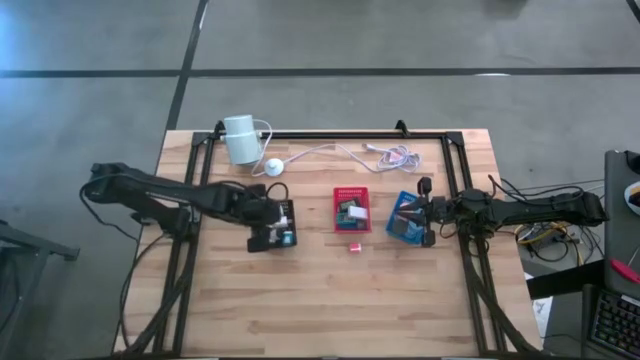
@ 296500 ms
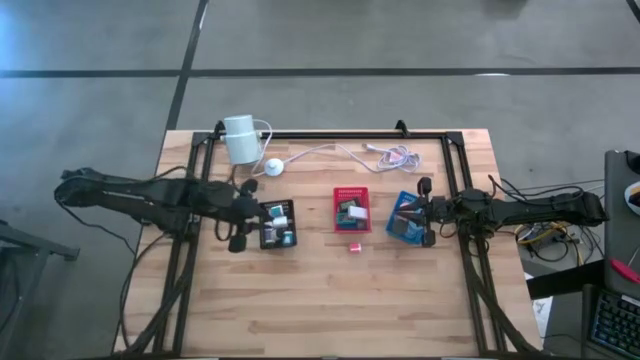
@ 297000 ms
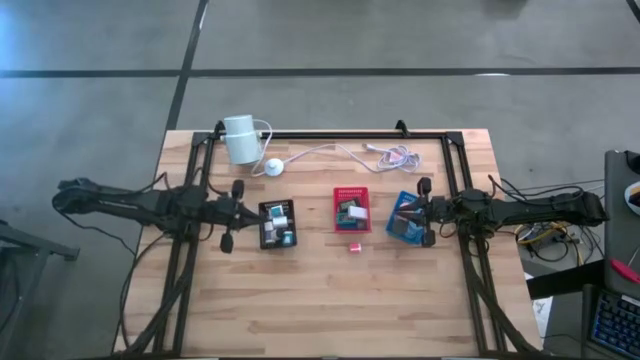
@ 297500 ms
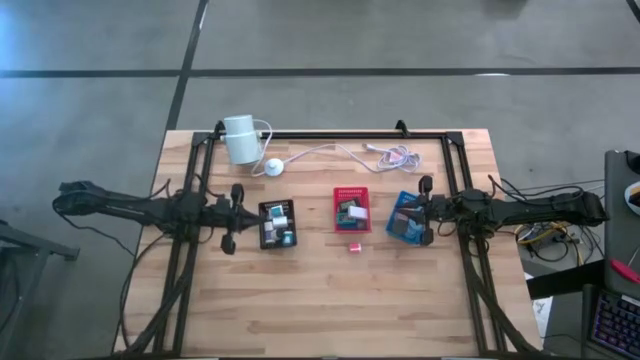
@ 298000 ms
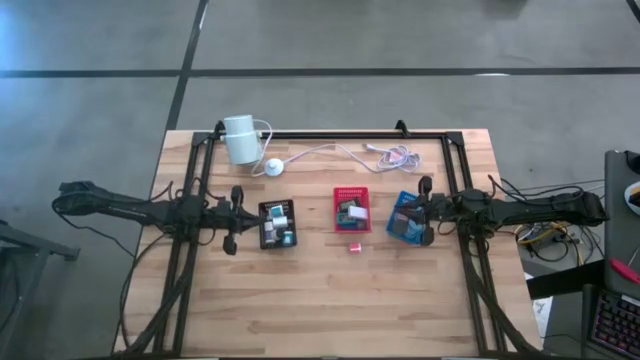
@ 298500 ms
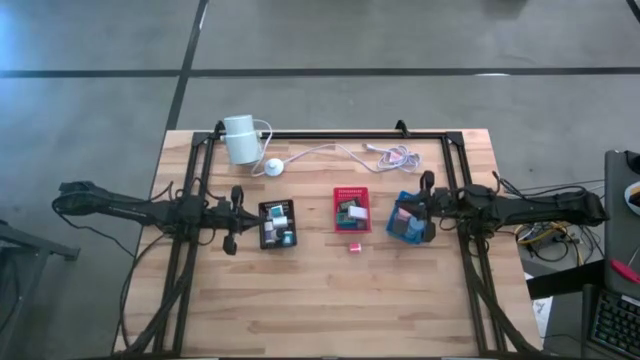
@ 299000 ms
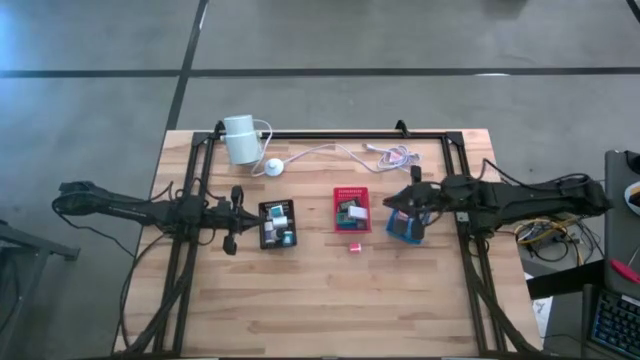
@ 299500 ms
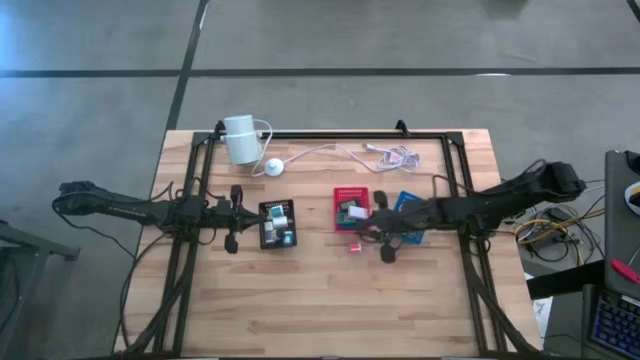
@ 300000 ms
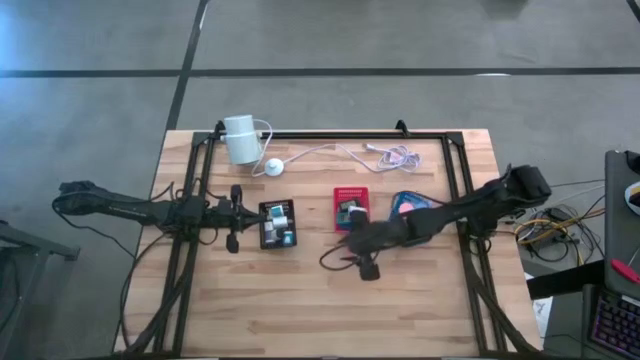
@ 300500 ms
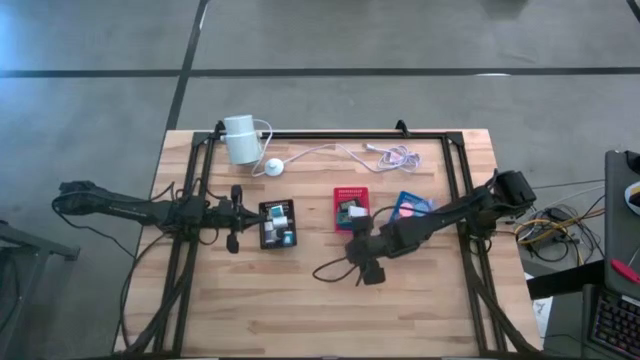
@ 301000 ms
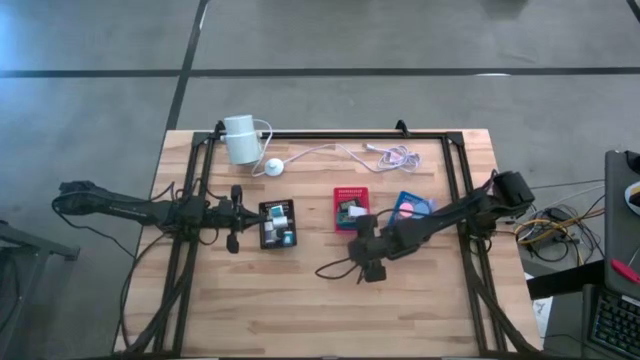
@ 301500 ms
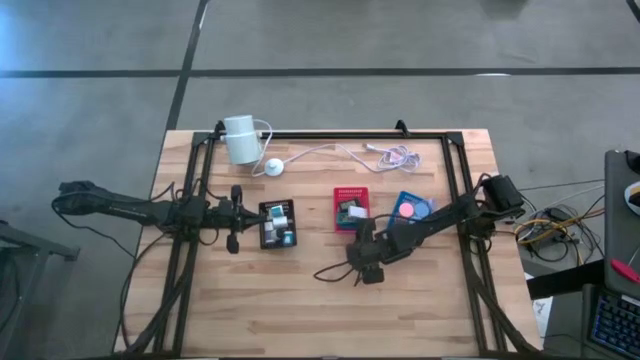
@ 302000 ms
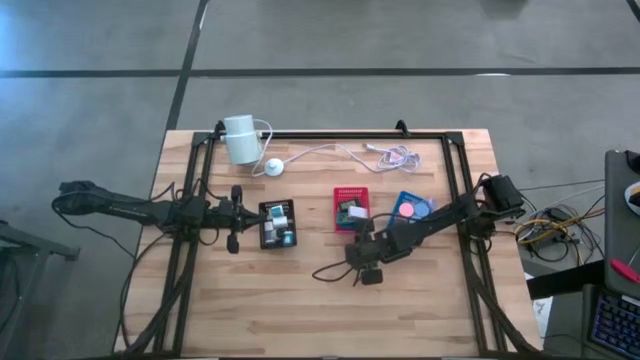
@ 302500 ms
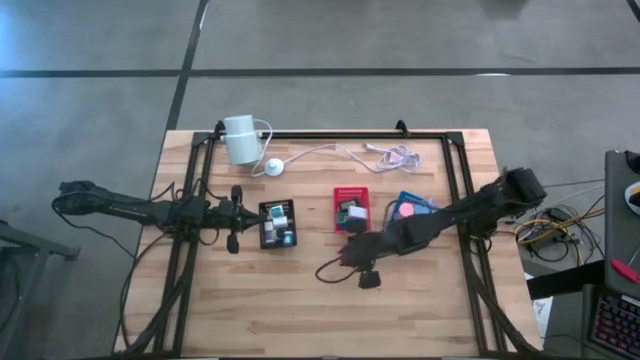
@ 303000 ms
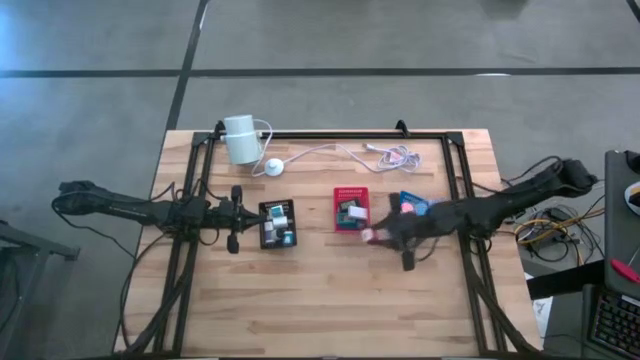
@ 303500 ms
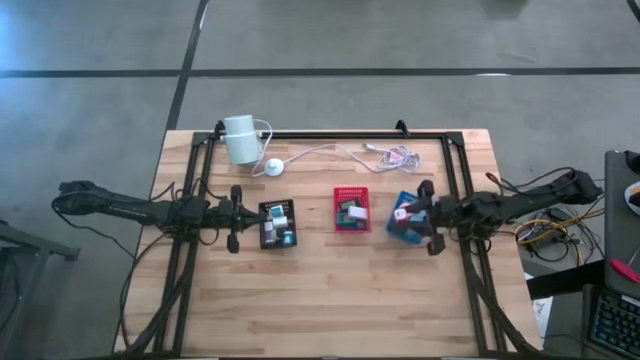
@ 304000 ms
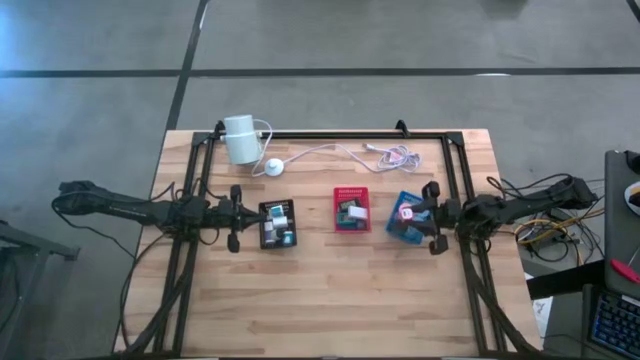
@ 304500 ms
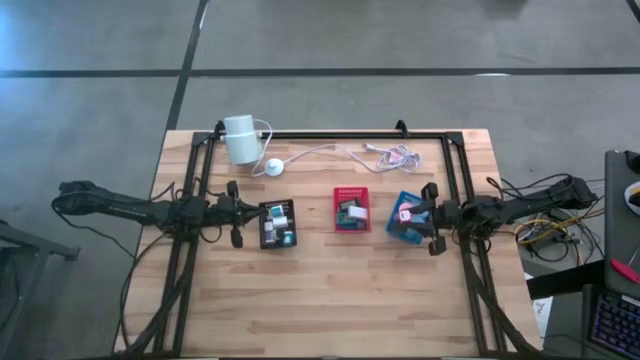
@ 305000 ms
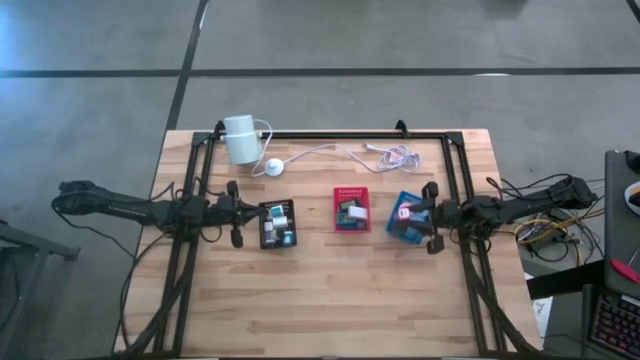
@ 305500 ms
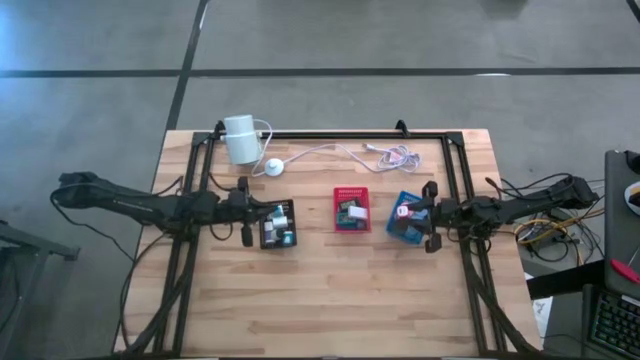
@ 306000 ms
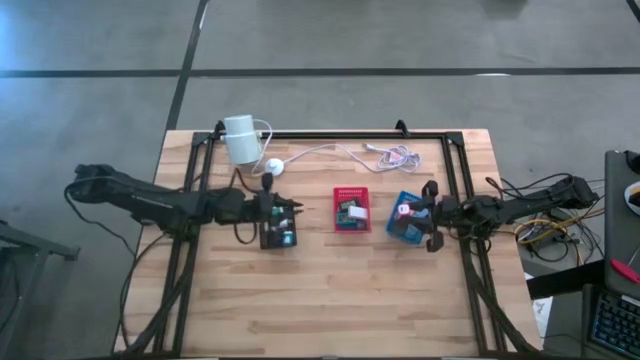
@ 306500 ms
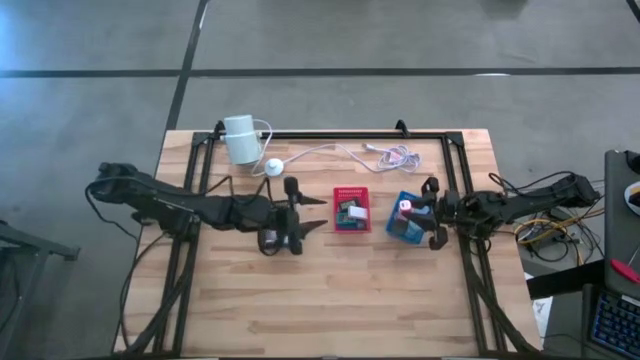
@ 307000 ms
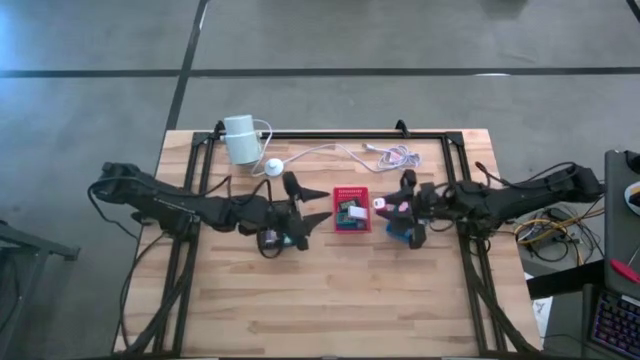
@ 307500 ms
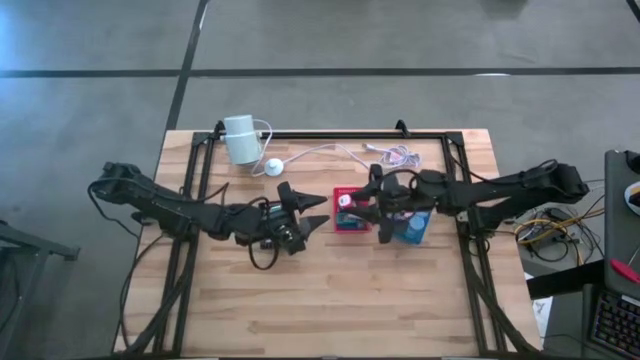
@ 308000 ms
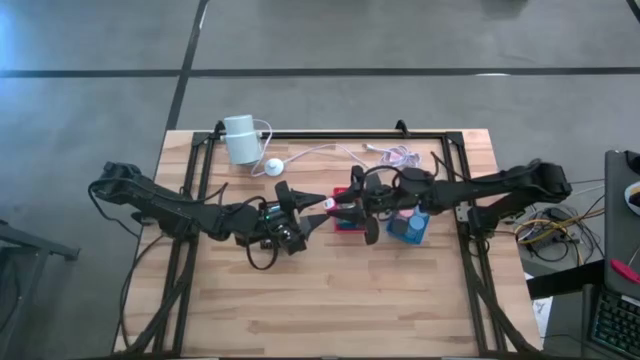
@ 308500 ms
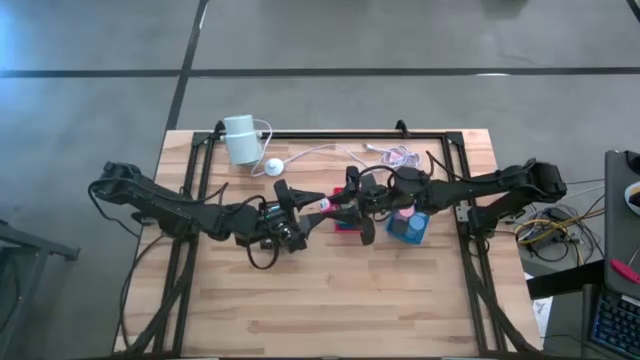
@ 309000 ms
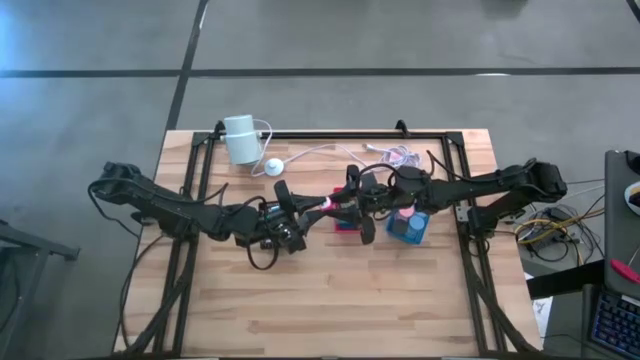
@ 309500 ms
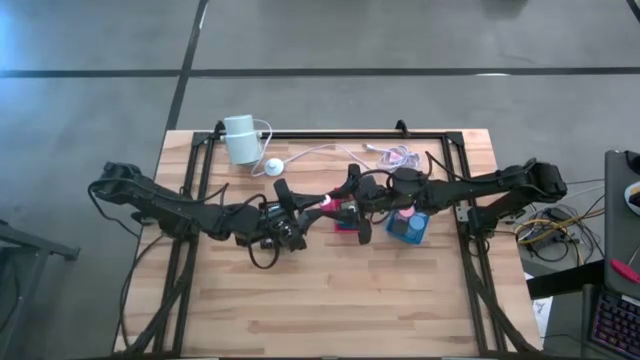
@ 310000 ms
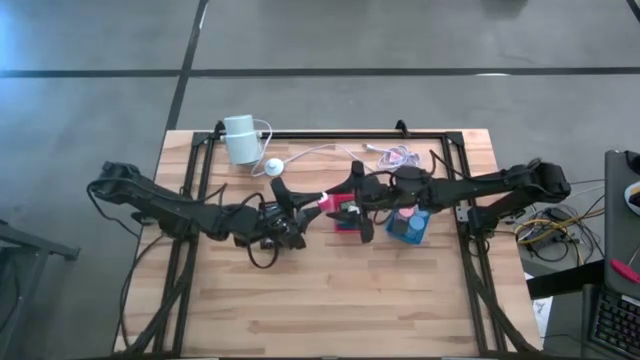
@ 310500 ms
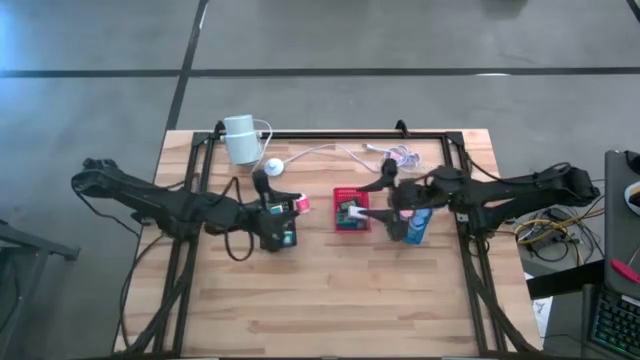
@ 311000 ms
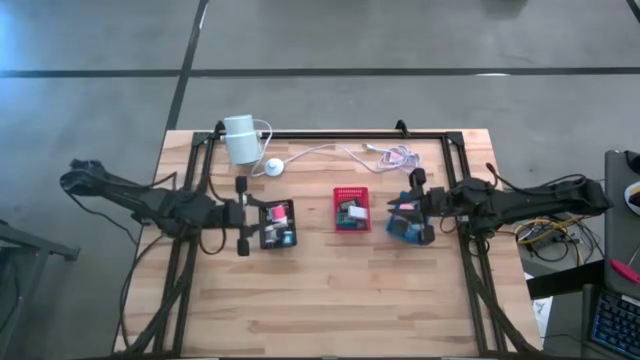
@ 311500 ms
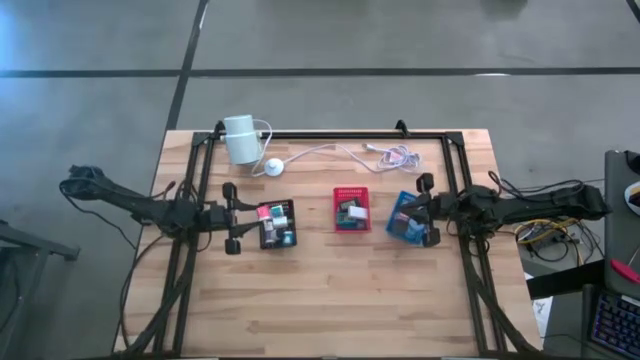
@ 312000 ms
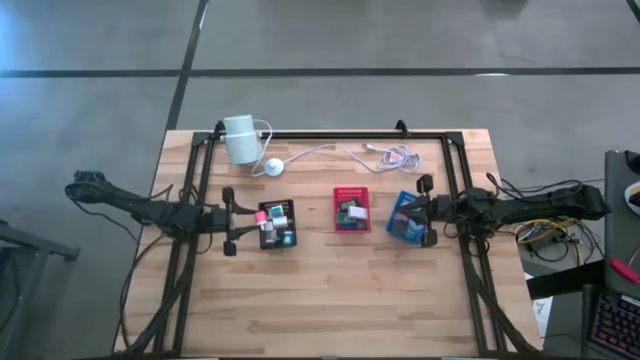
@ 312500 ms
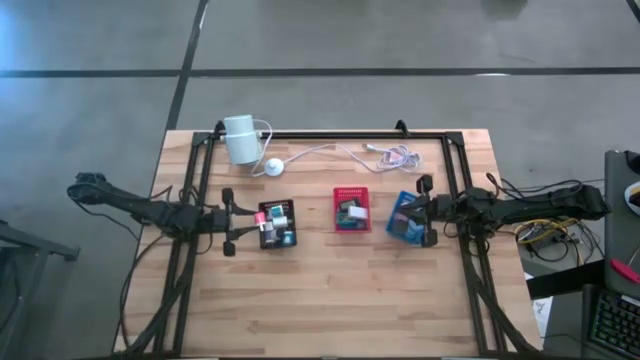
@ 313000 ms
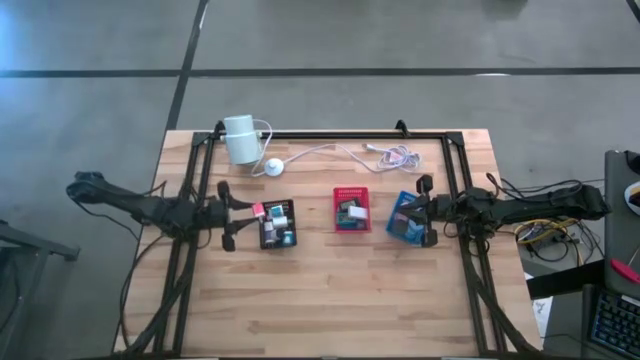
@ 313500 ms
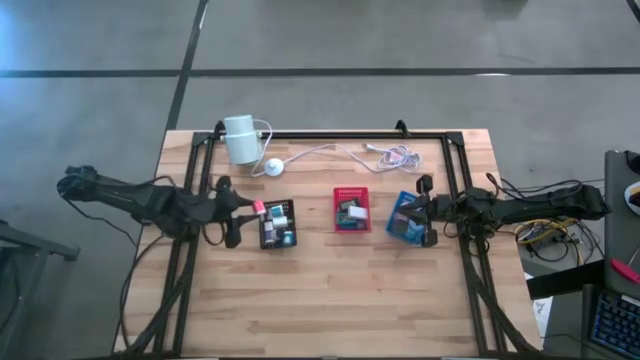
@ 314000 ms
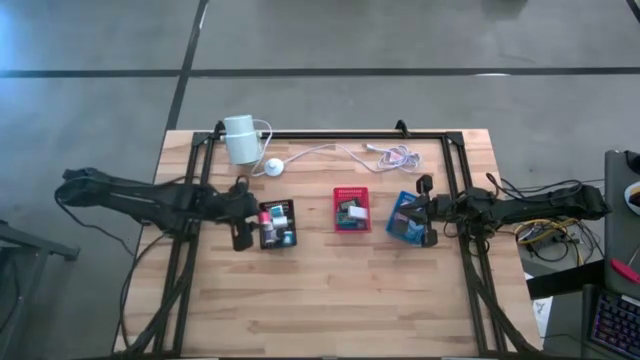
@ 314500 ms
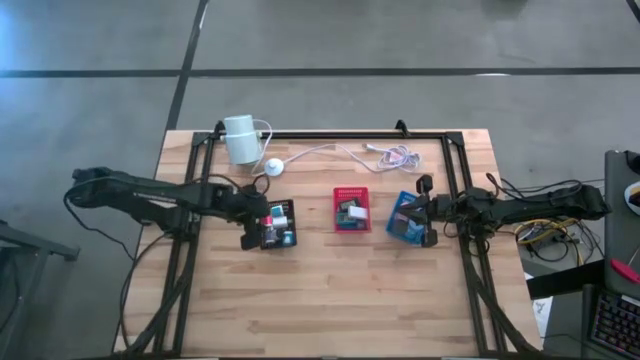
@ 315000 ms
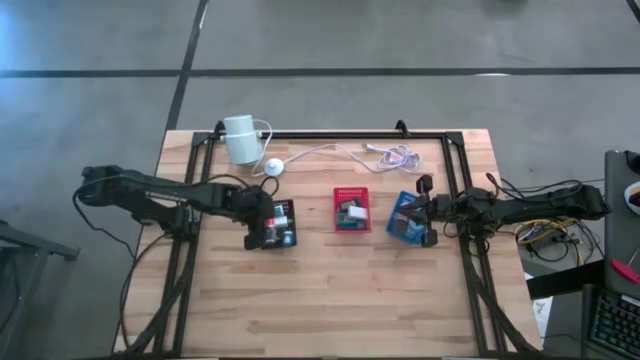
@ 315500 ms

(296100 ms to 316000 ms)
Task: Pick & Place Office items
Put the red charger adapter into the black bin

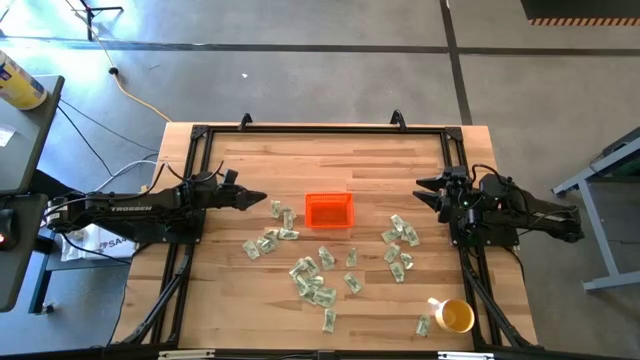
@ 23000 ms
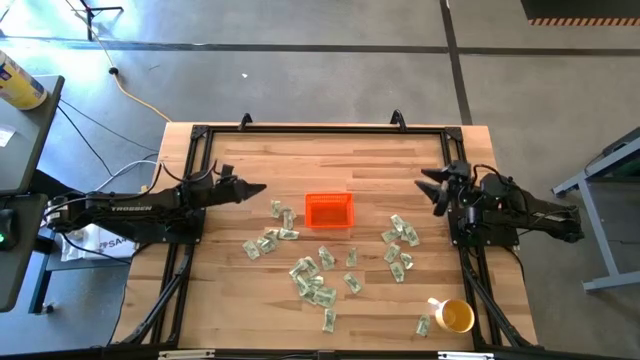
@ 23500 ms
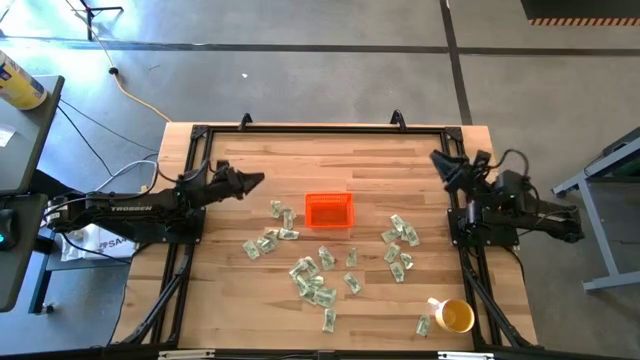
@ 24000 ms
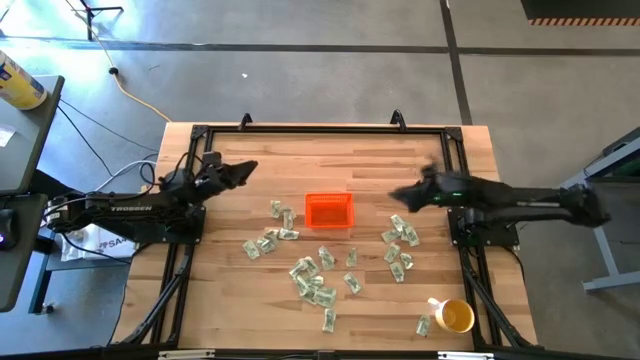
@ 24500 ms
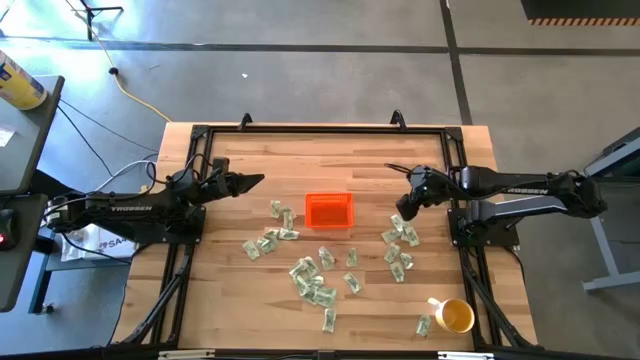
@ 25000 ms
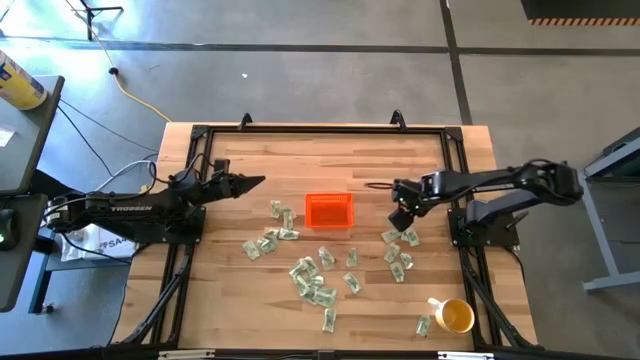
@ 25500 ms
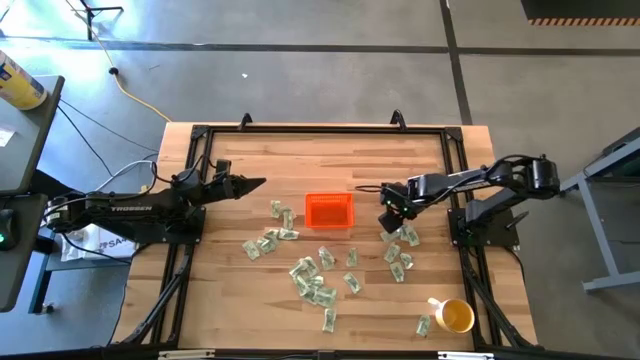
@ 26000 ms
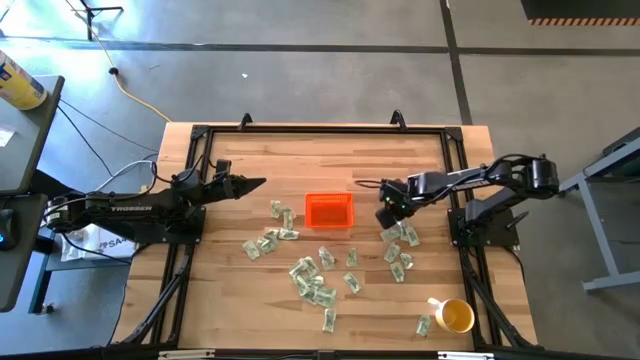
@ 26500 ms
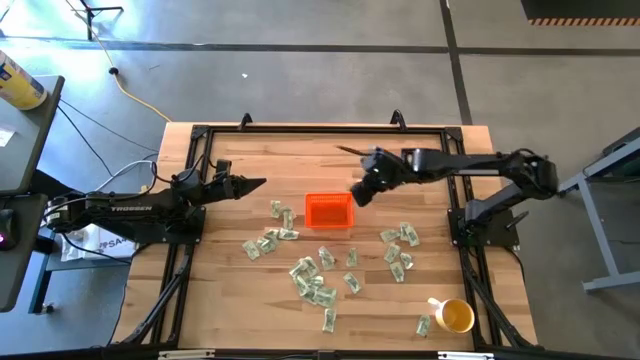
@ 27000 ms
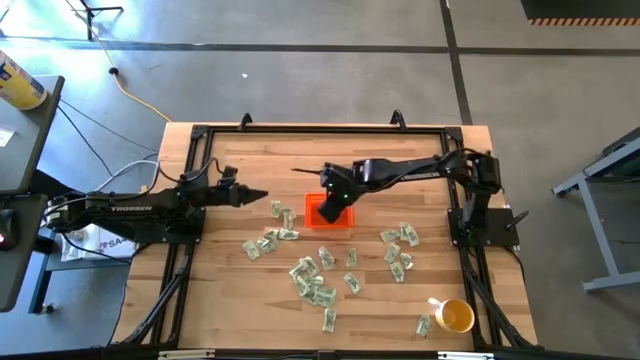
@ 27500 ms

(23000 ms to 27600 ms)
Task: Pick and place Stevia / Truvia into bins
Put the stevia packet into the orange bin
